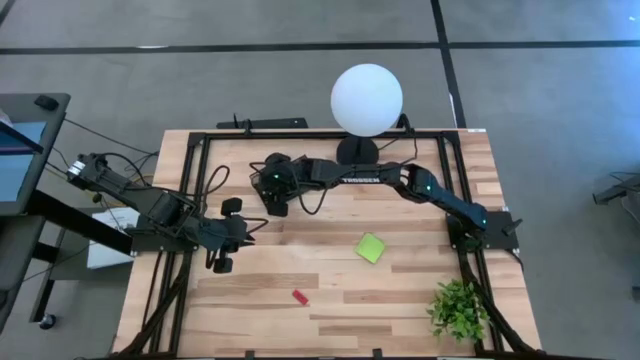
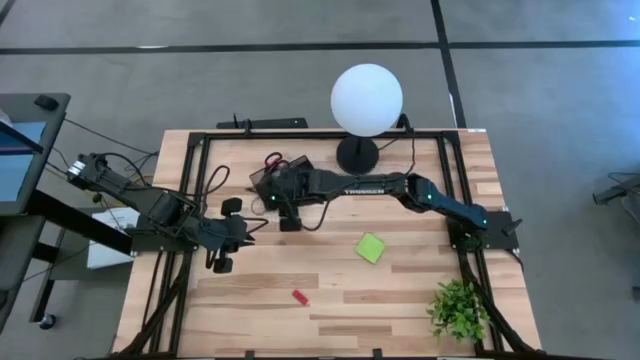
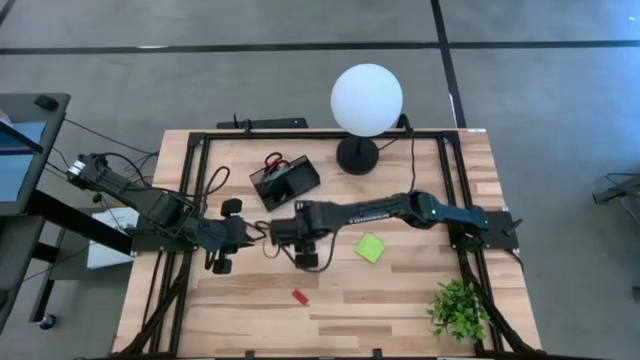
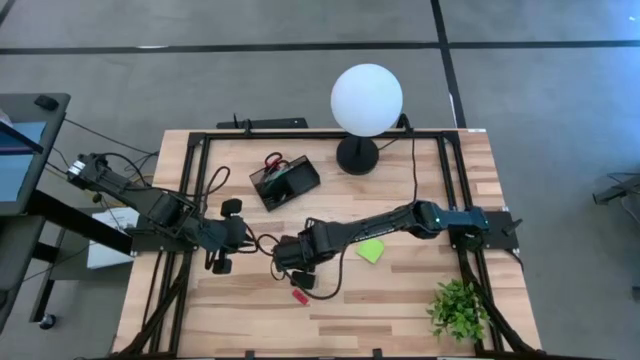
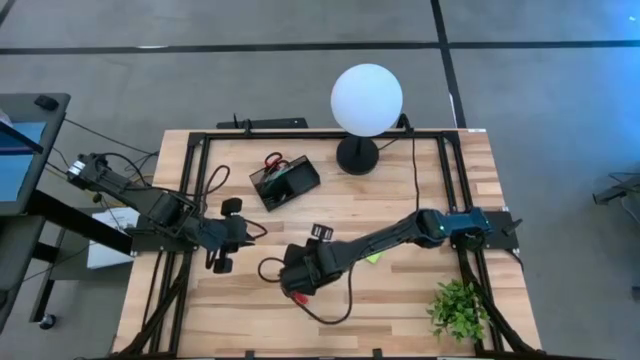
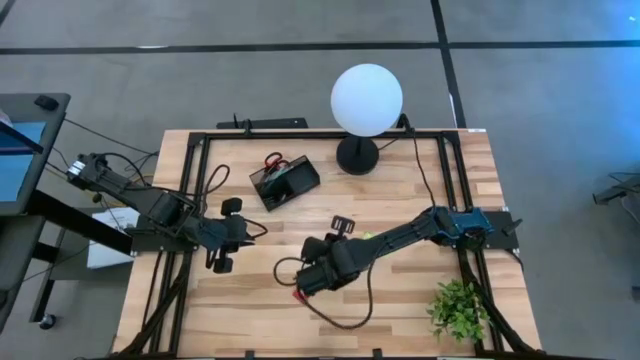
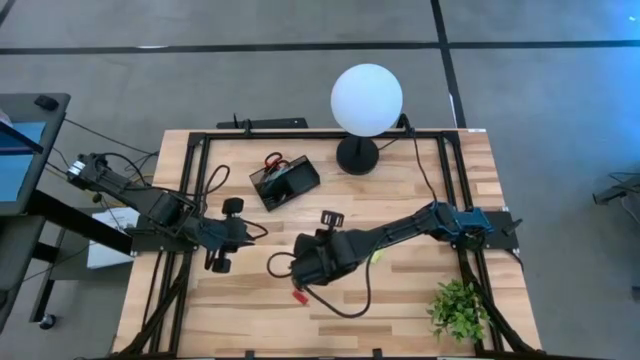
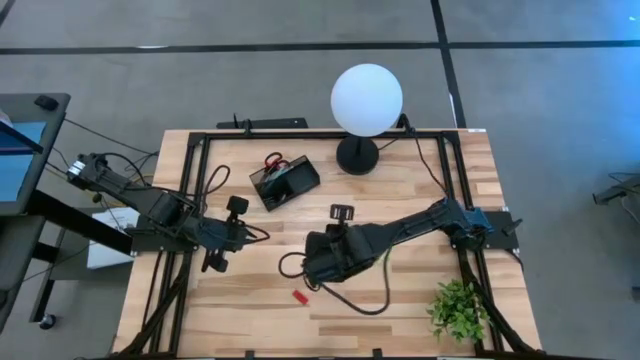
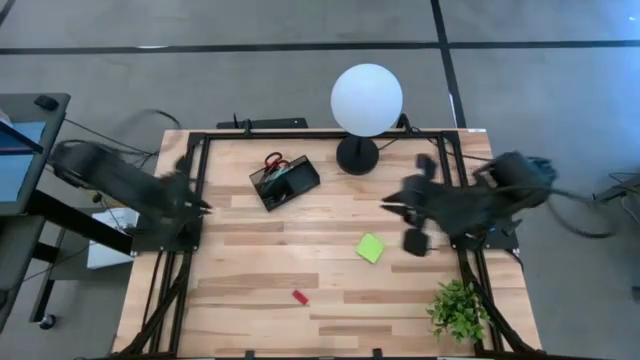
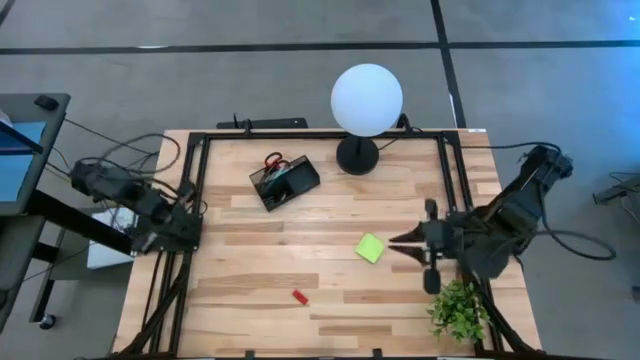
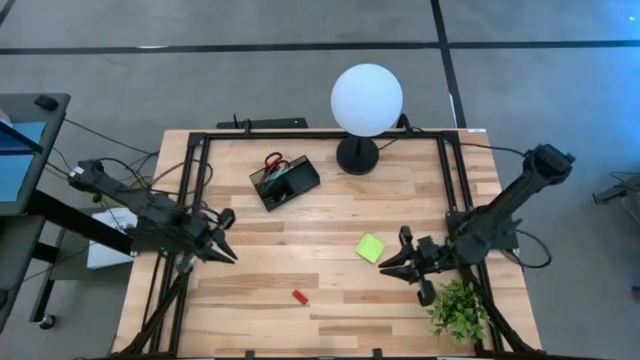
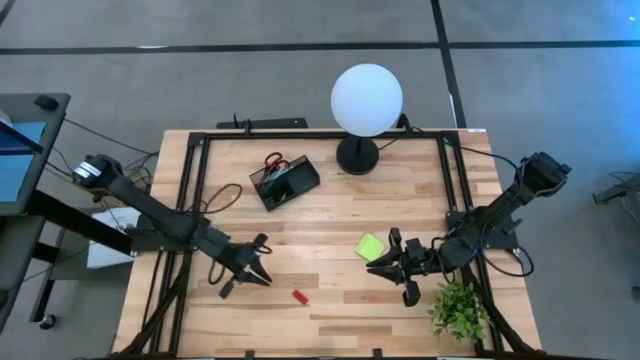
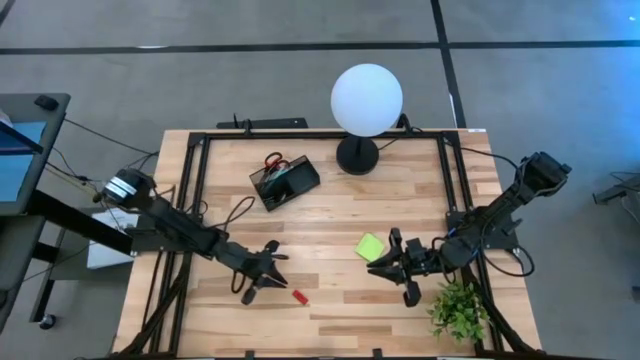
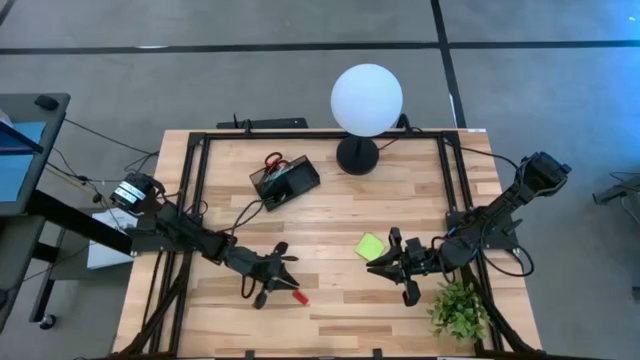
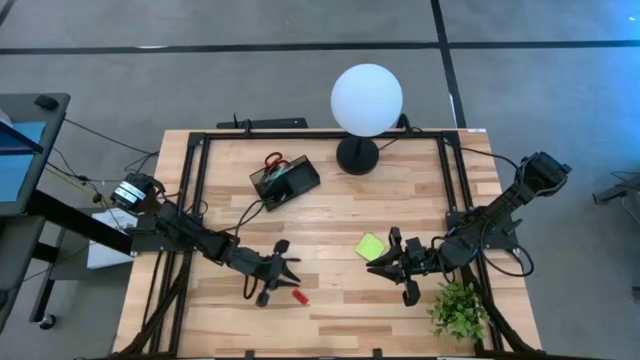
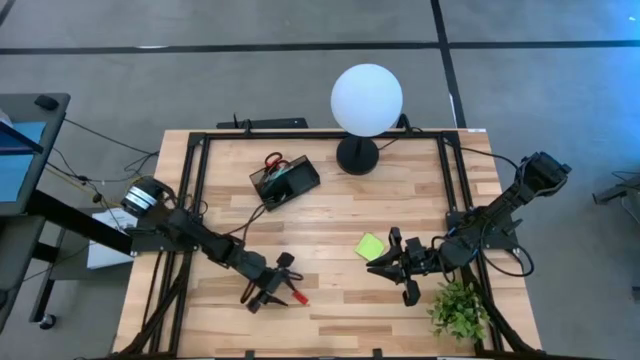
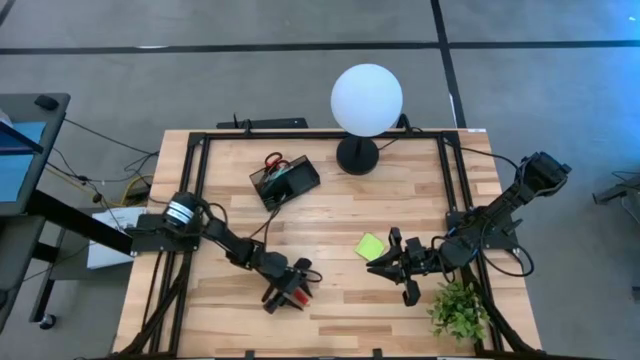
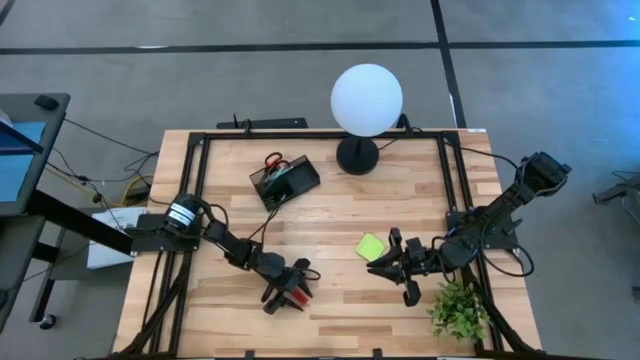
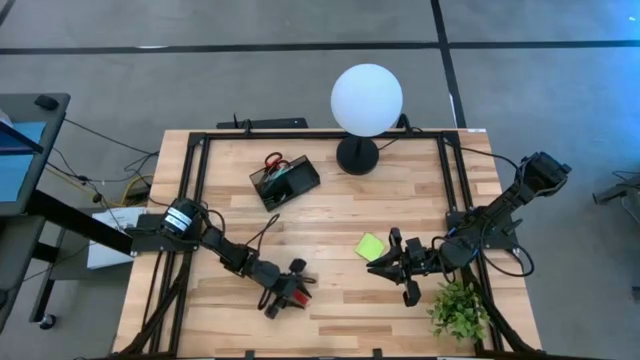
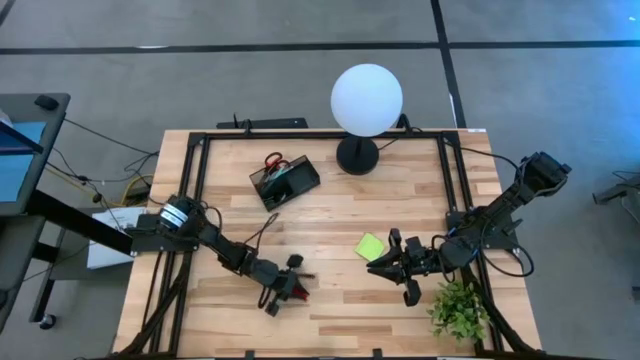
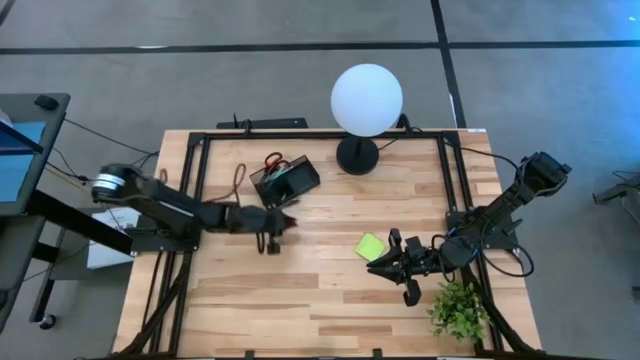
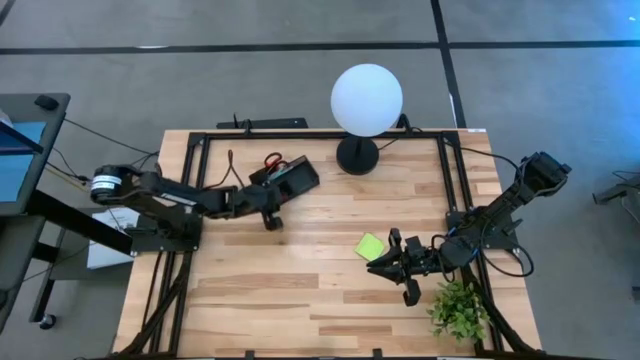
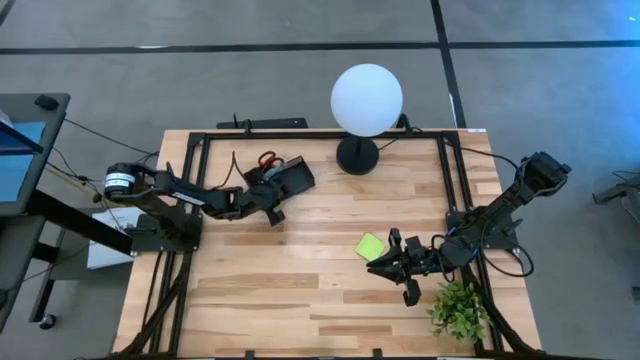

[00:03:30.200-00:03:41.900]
Task: Pick and place office supplies into organizer
Put the red eraser into the black desk organizer

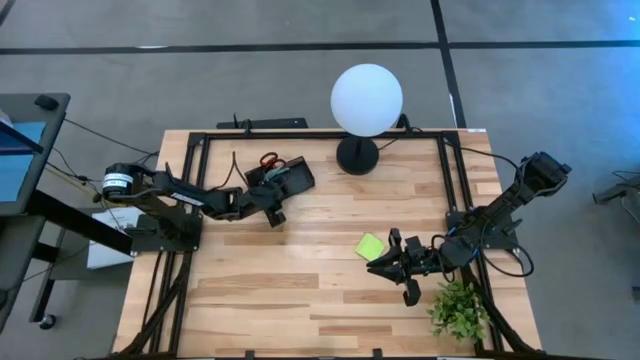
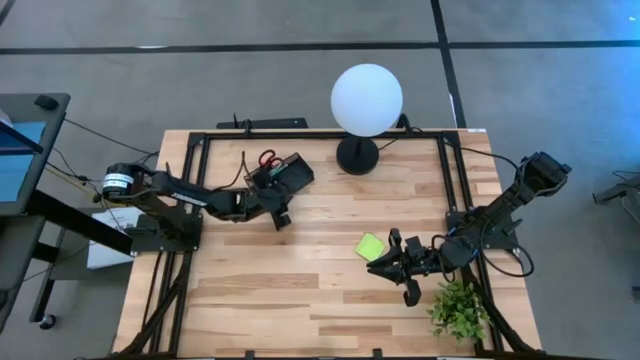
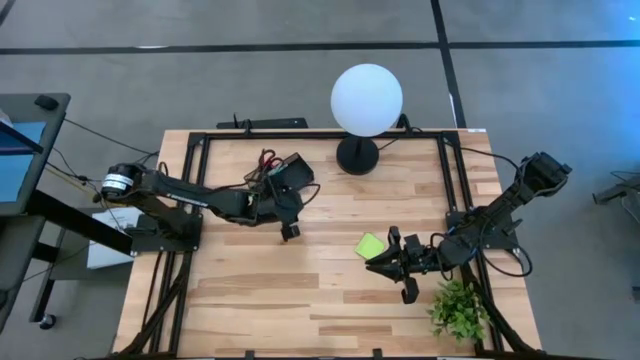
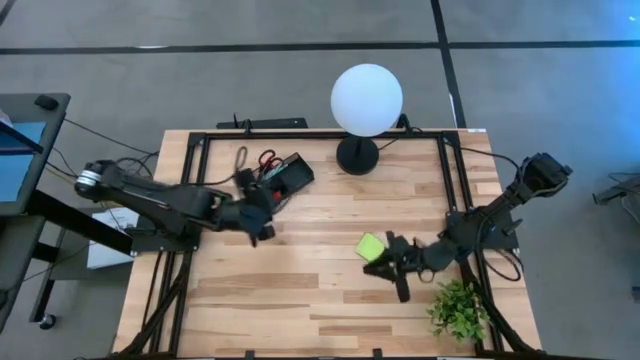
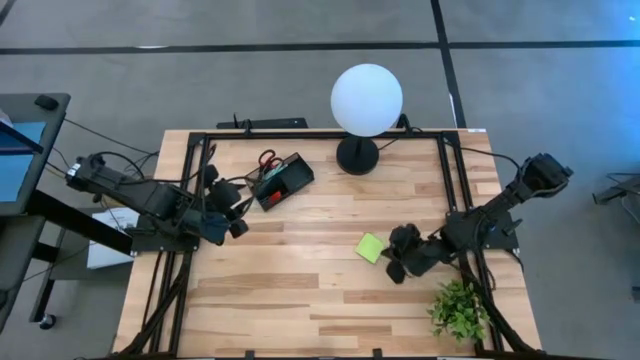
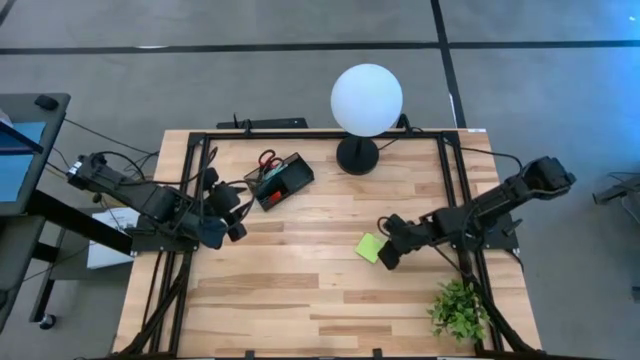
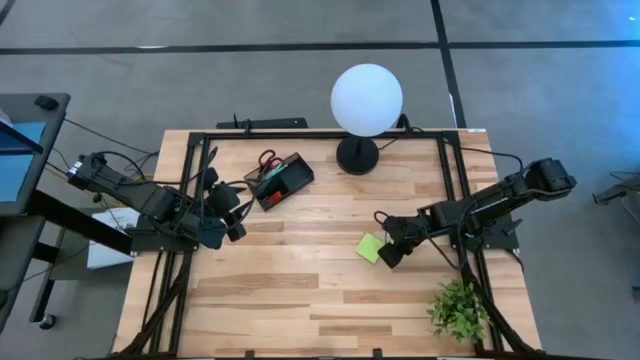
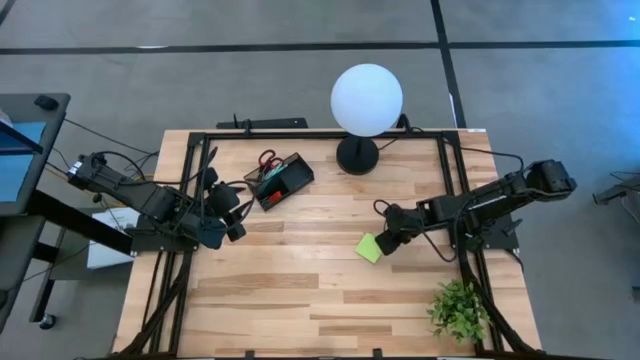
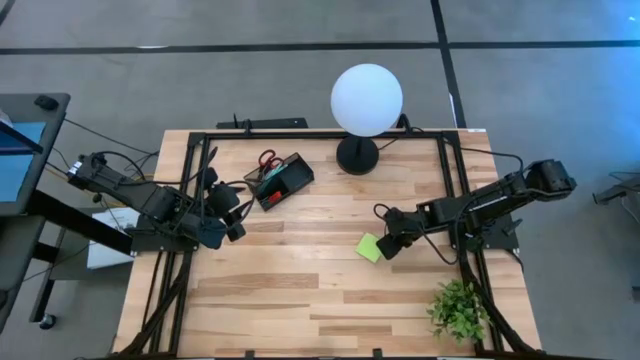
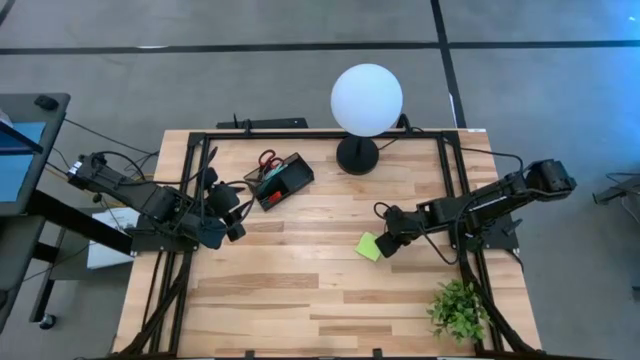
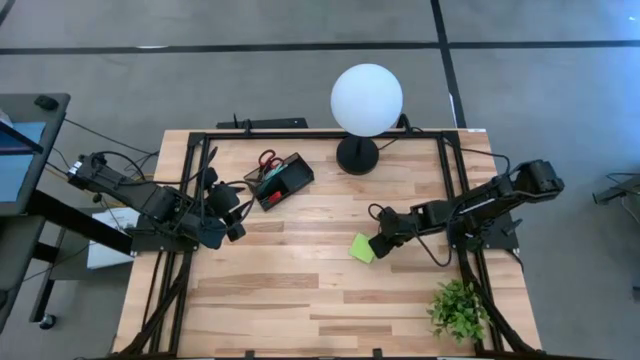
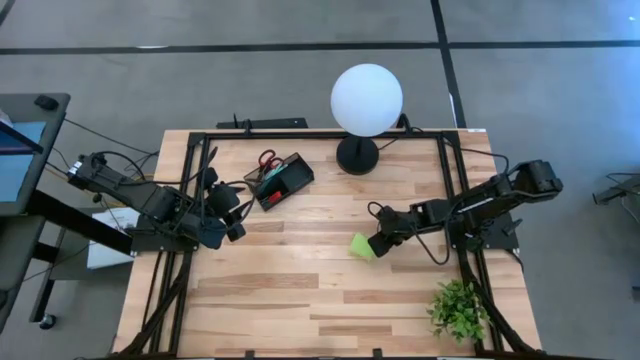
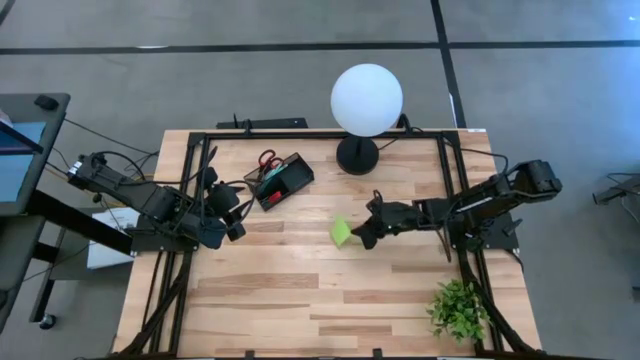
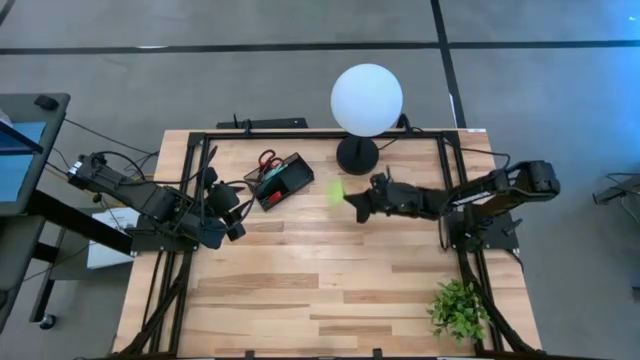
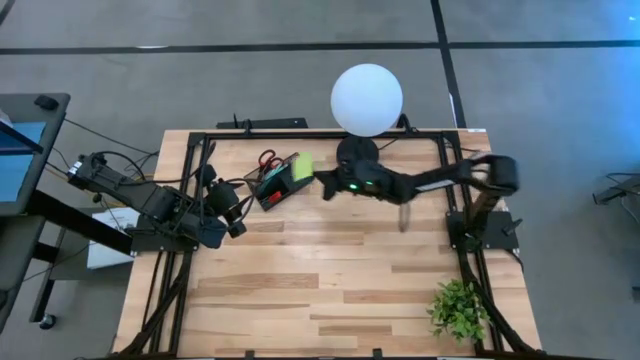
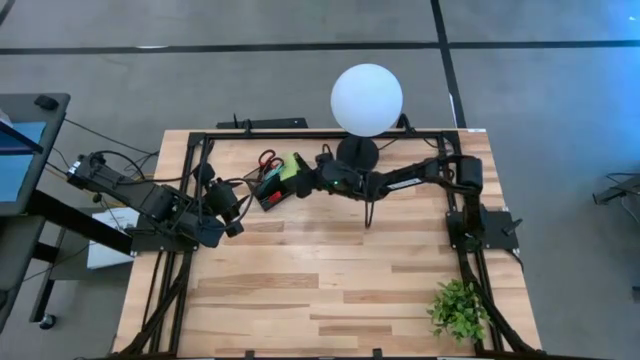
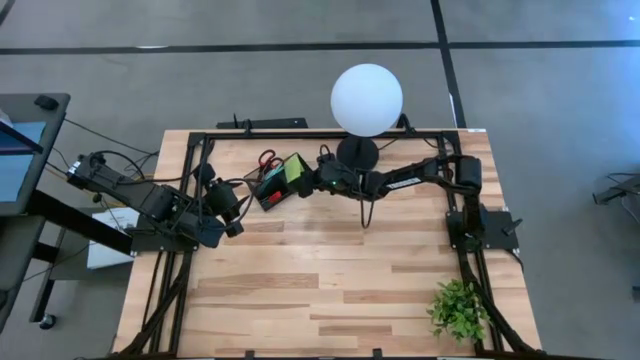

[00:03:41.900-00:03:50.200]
Put the green sticky note into the black desk organizer

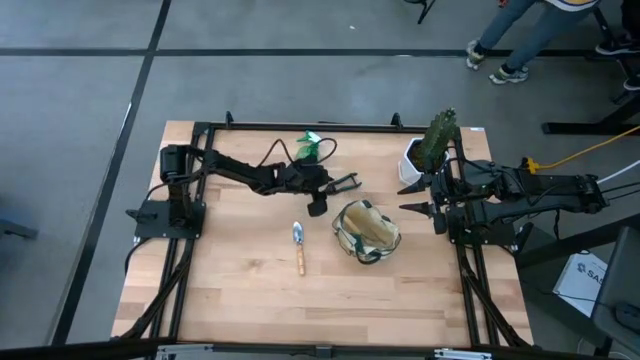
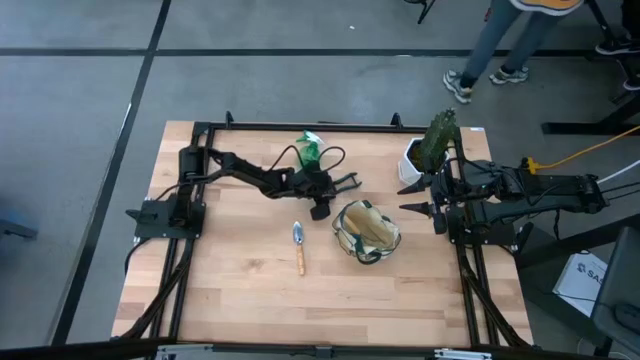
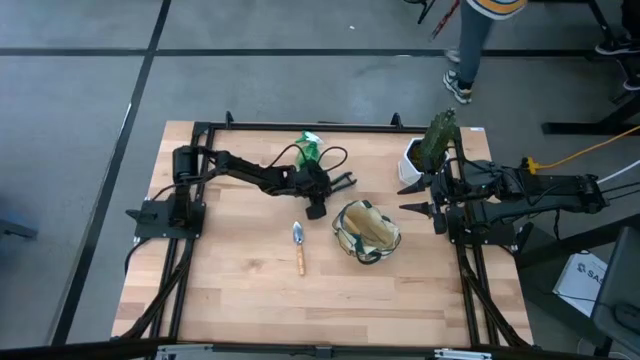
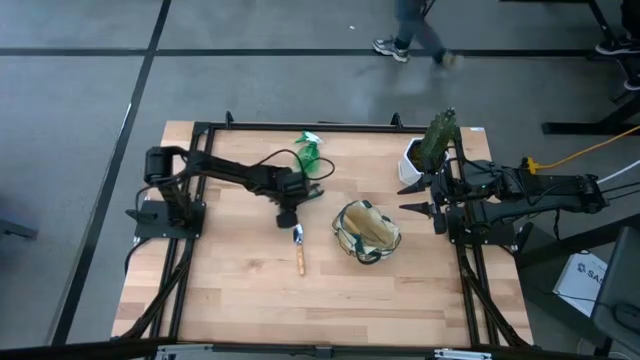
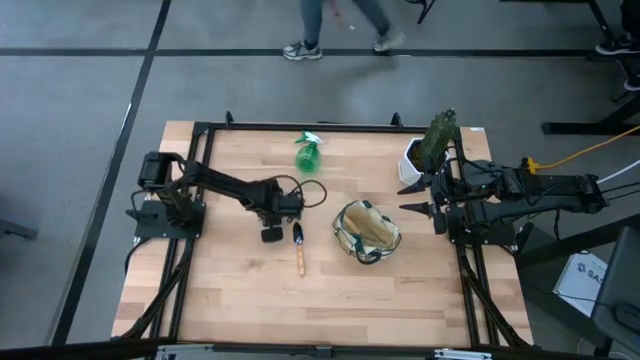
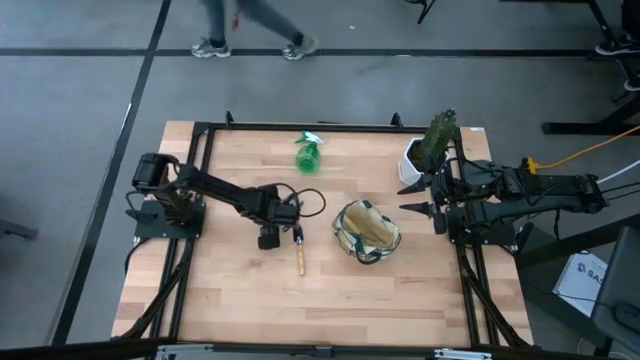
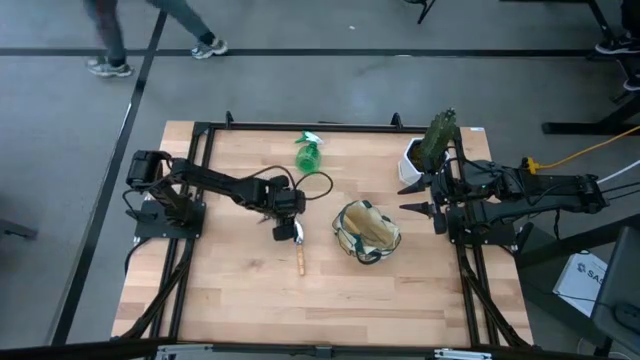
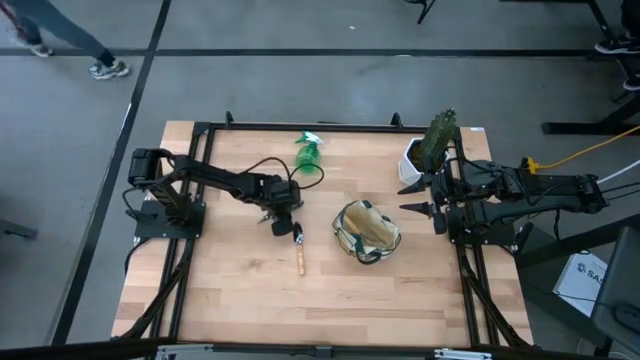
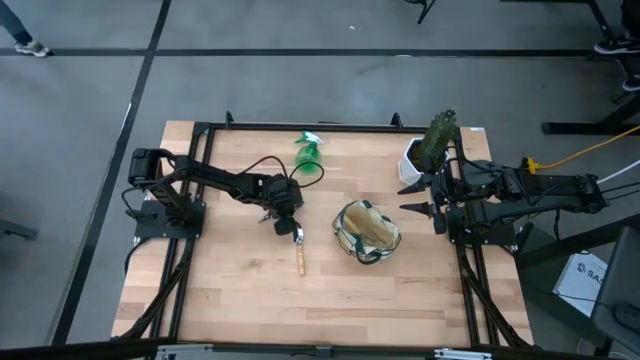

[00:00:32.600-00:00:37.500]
Task: Pick & Place Garden tools in Gardening bag
Put the green shear scissors into the light brown gardening bag
